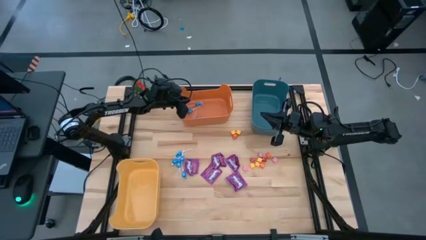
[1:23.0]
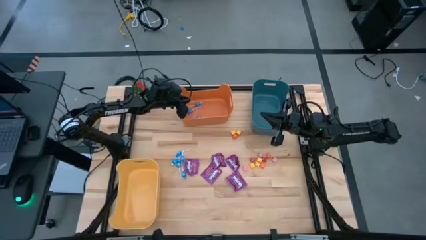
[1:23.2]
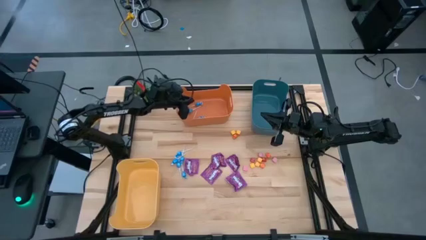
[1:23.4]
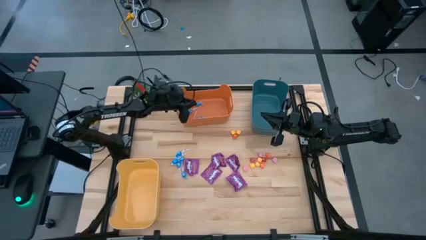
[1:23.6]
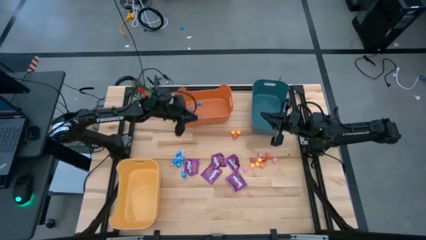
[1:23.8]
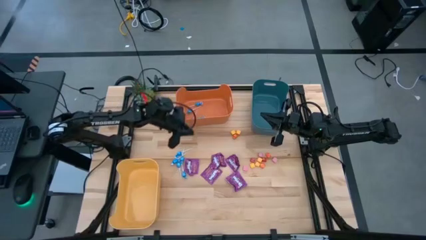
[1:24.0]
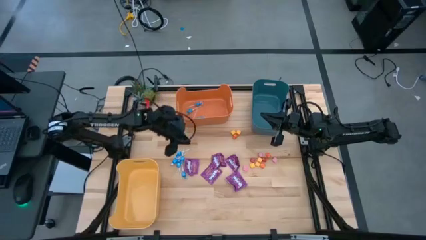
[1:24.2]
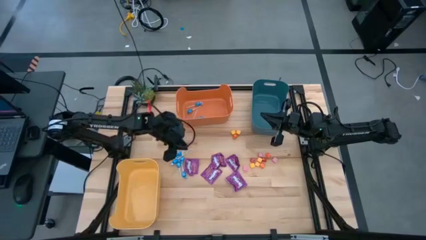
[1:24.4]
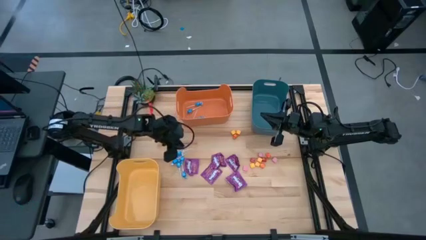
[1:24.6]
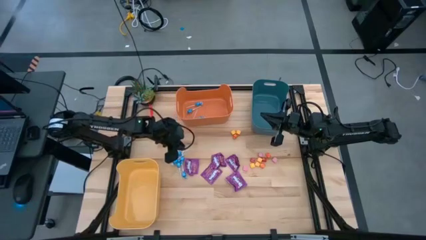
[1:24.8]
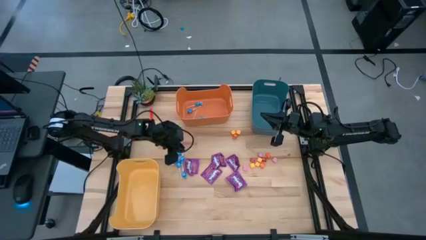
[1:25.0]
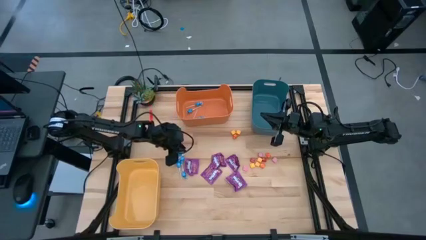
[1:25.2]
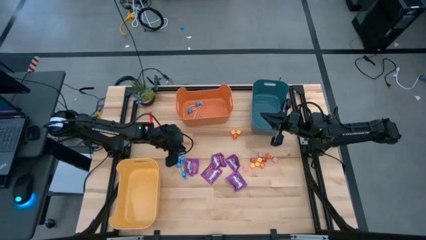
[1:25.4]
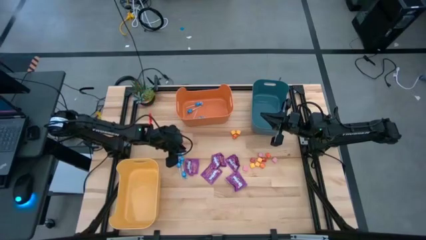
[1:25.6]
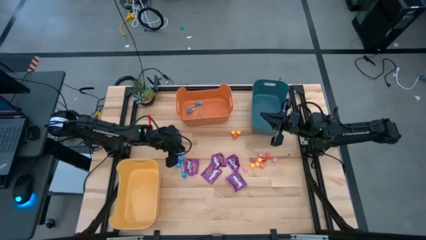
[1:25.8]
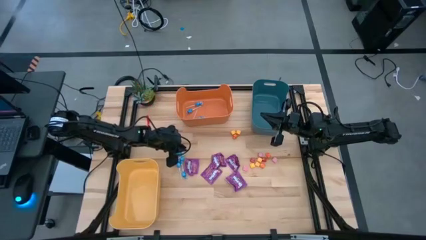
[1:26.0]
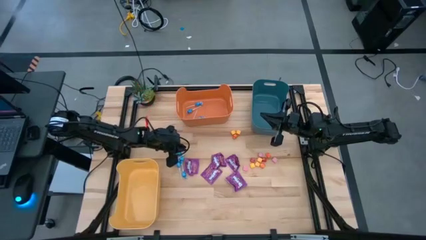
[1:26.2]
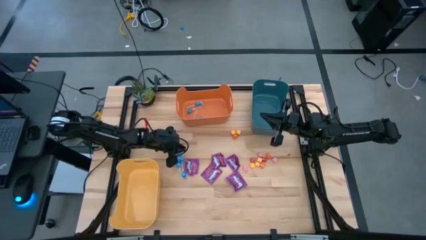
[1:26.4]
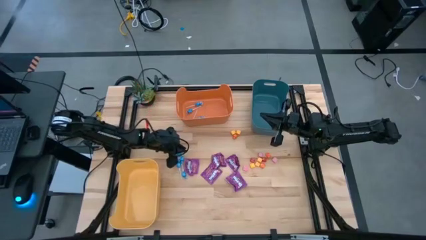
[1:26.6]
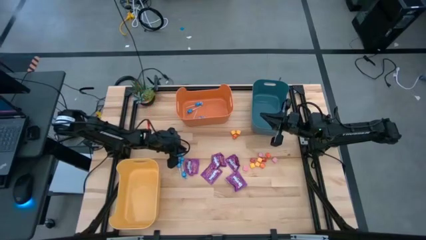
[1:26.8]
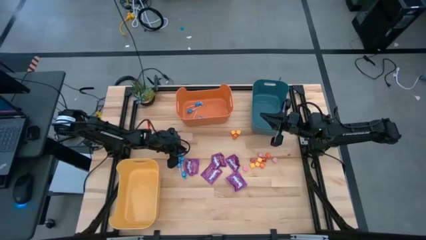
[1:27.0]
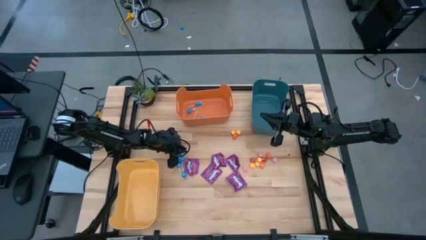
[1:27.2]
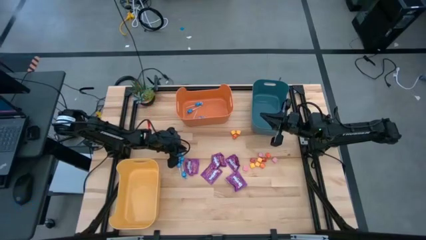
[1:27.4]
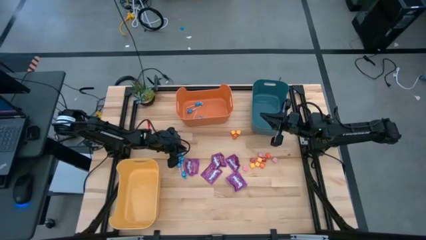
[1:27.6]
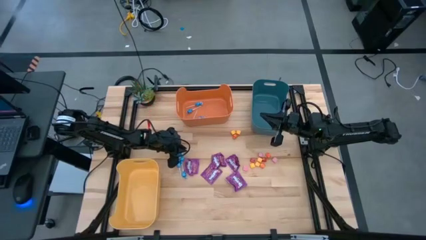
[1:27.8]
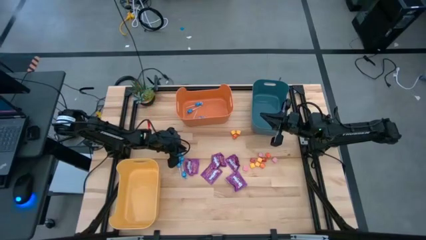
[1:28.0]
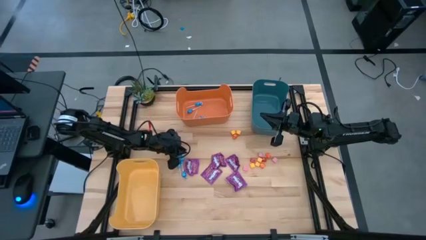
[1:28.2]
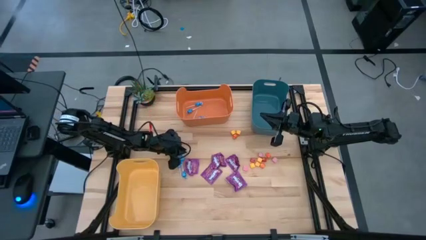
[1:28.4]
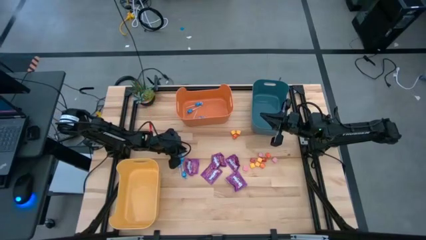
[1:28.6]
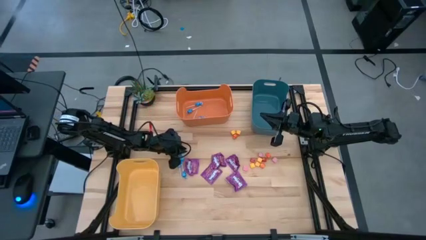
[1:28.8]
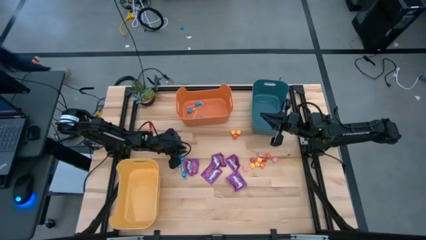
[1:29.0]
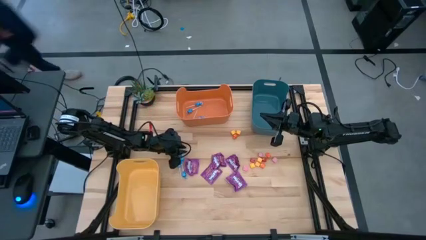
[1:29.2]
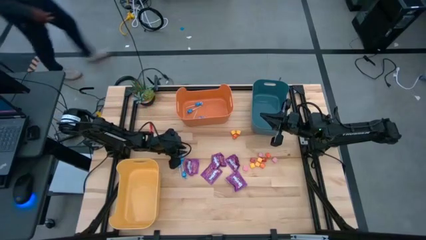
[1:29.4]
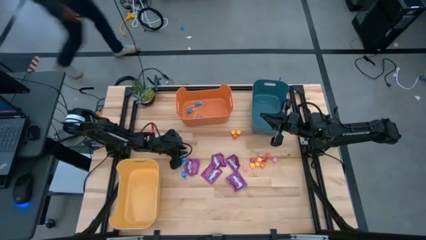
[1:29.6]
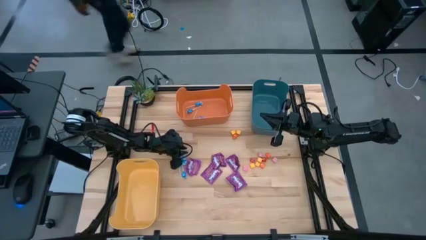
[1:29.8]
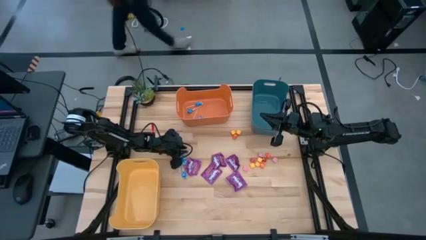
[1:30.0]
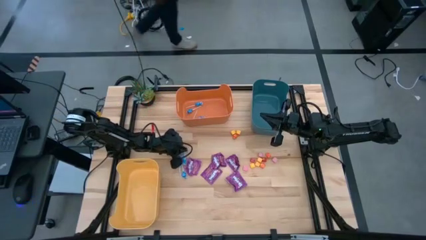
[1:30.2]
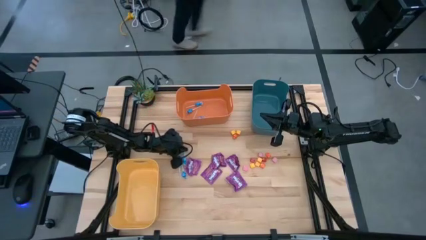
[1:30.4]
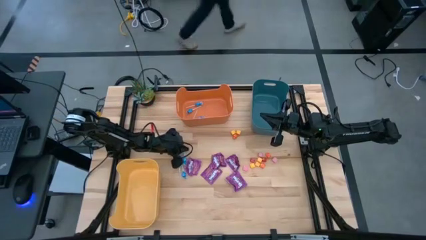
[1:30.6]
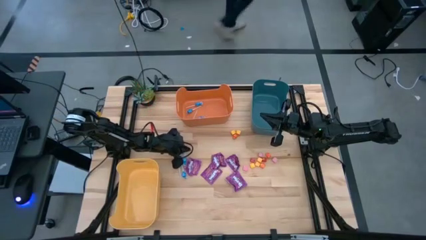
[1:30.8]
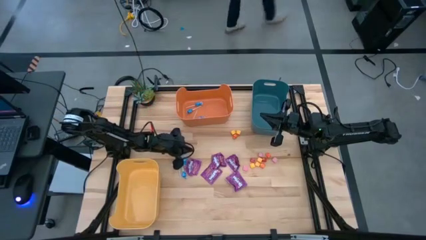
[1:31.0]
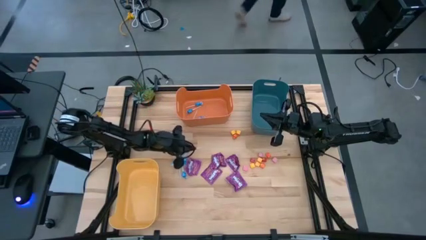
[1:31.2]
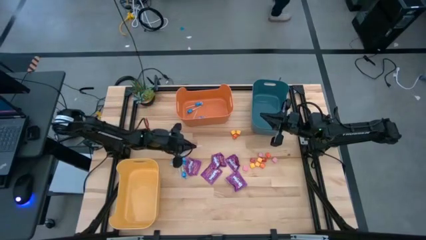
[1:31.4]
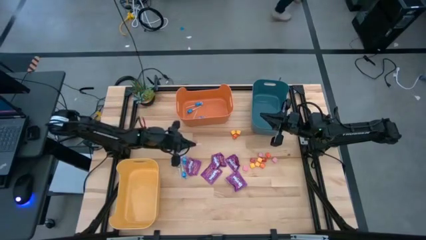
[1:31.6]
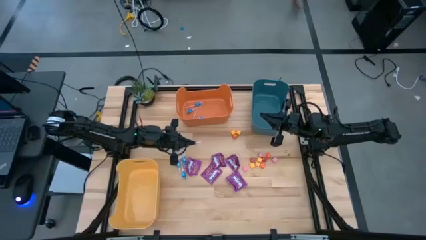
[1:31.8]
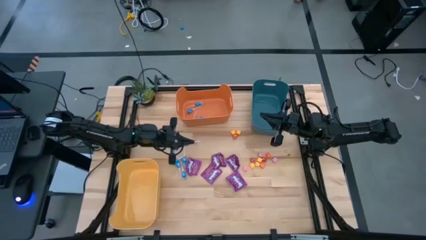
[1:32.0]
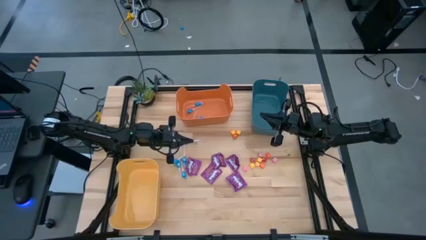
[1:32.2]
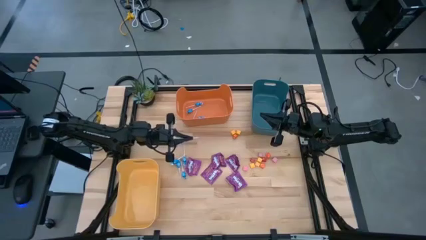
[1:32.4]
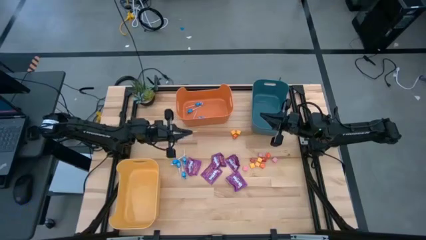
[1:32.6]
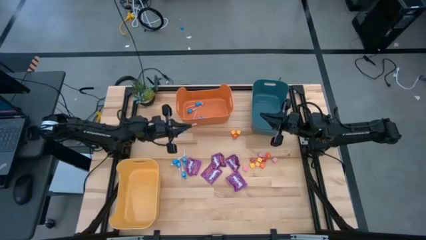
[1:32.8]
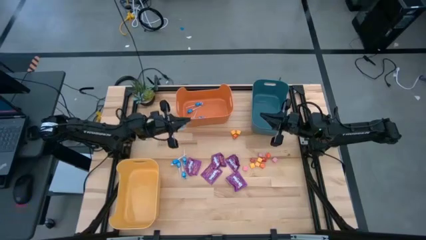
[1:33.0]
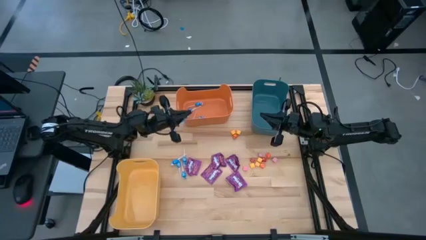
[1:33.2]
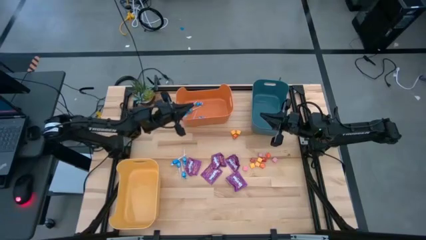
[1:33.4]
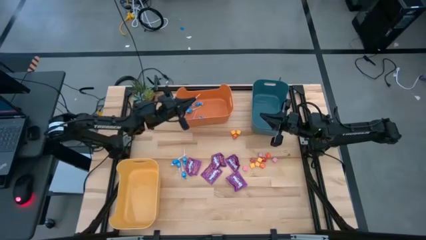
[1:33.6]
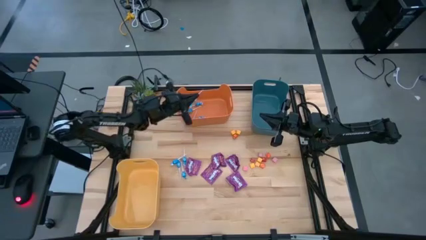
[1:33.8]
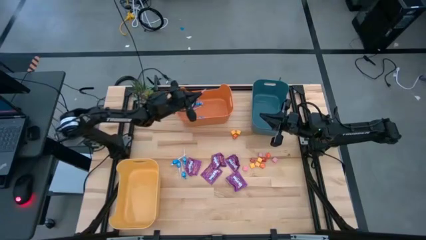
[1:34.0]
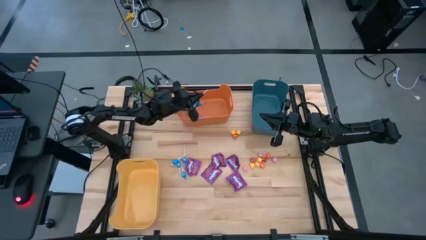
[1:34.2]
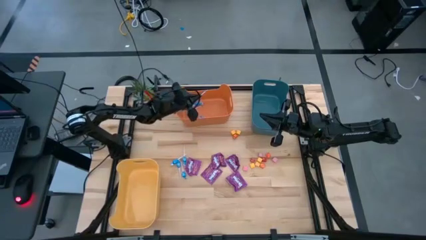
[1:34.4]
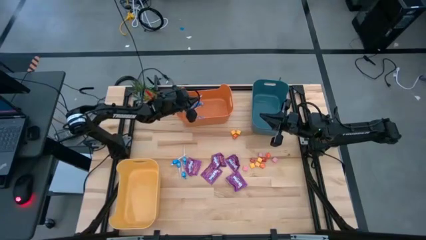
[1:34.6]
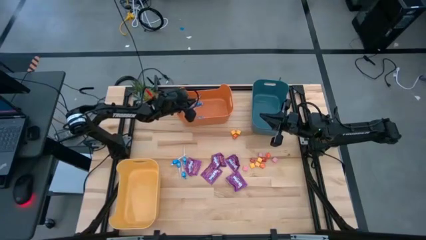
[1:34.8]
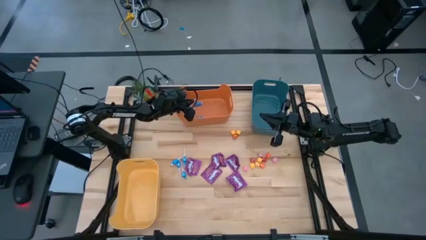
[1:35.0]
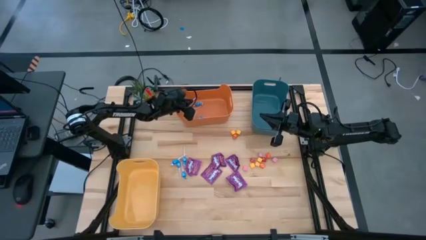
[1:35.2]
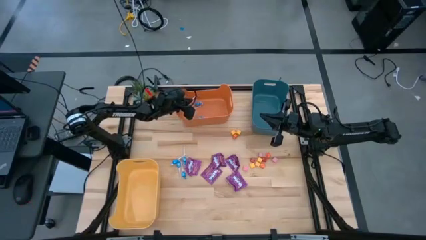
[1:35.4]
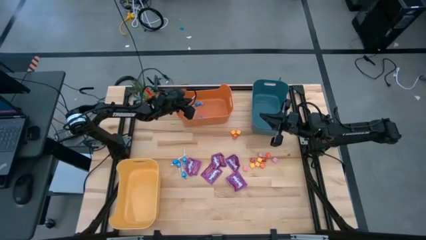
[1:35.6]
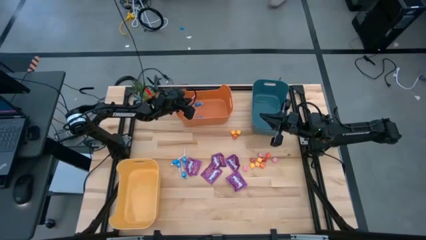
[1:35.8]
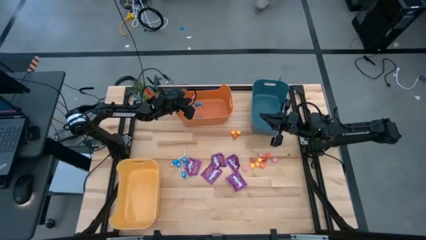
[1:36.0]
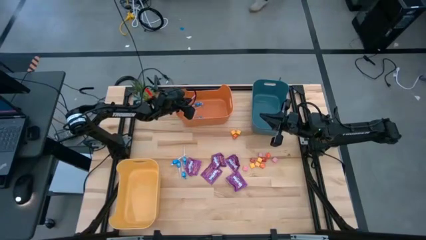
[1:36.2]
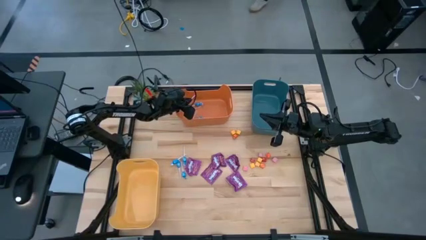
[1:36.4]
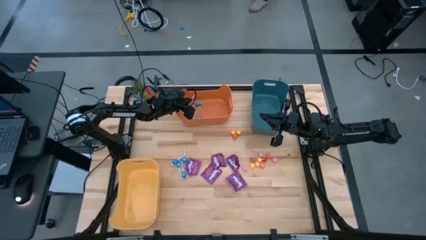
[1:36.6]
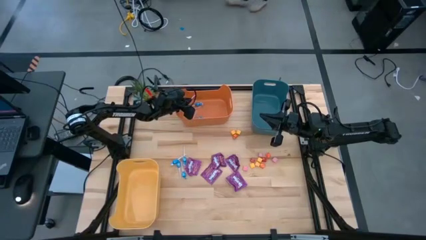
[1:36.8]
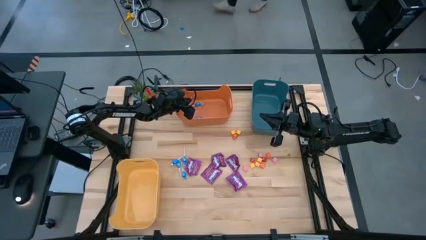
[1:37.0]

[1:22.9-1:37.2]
Task: Sort candy
Put the blue candy into the orange bin
